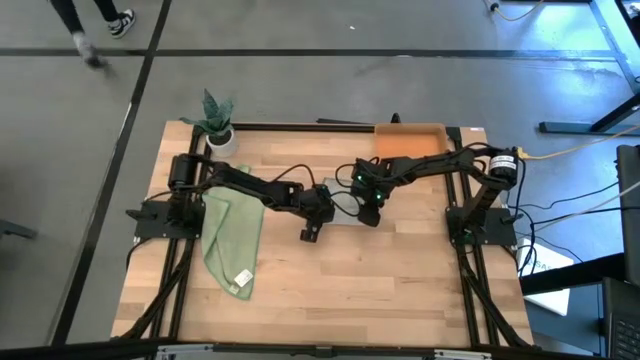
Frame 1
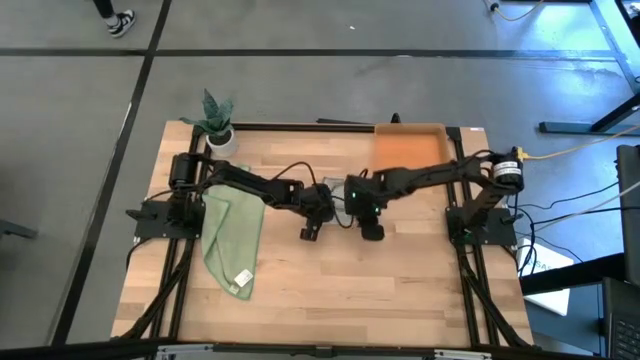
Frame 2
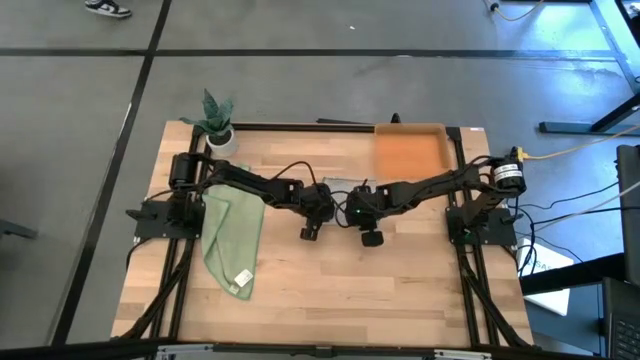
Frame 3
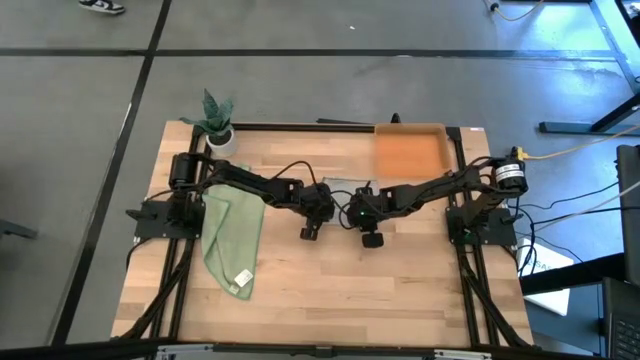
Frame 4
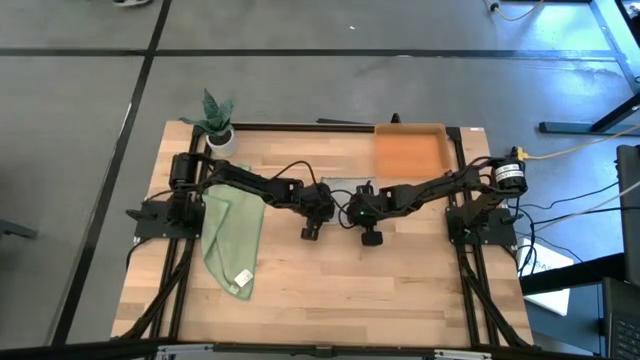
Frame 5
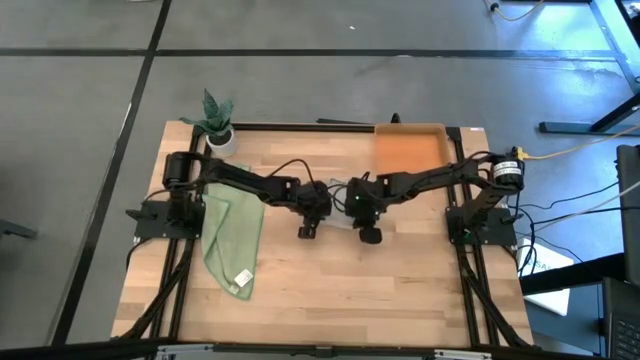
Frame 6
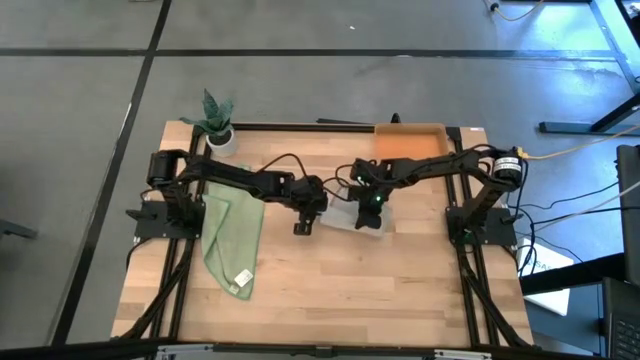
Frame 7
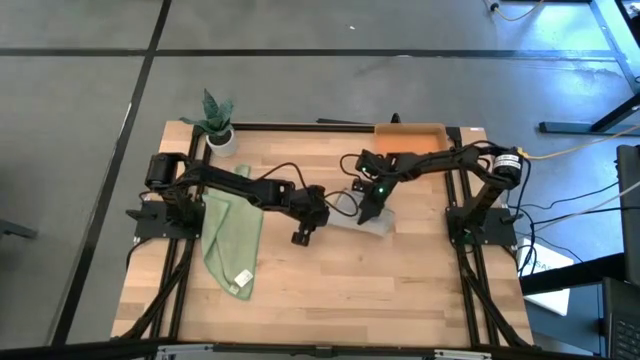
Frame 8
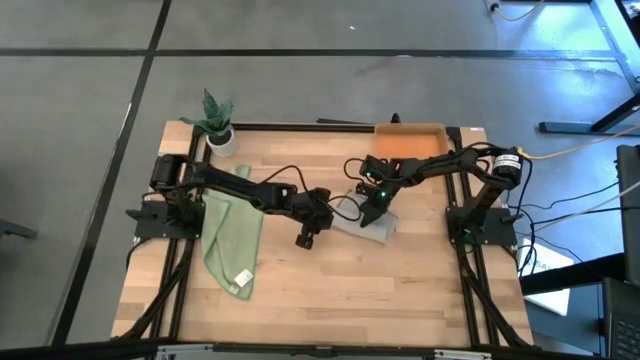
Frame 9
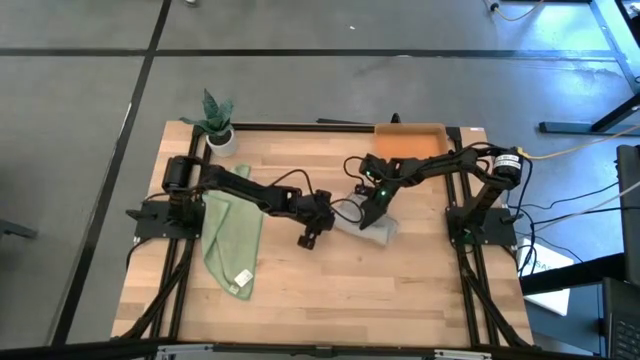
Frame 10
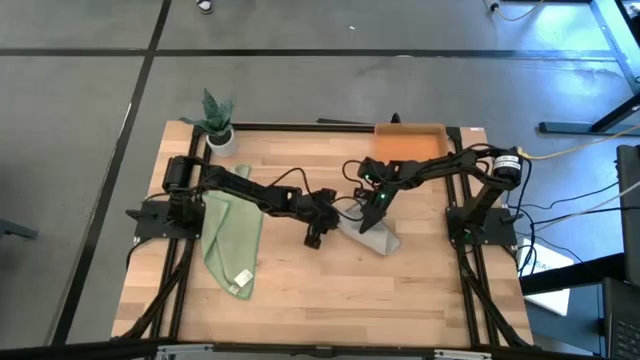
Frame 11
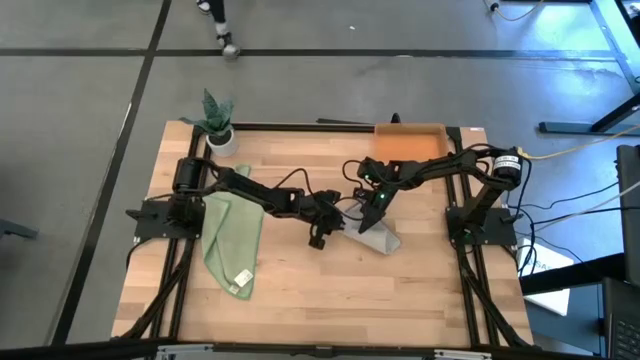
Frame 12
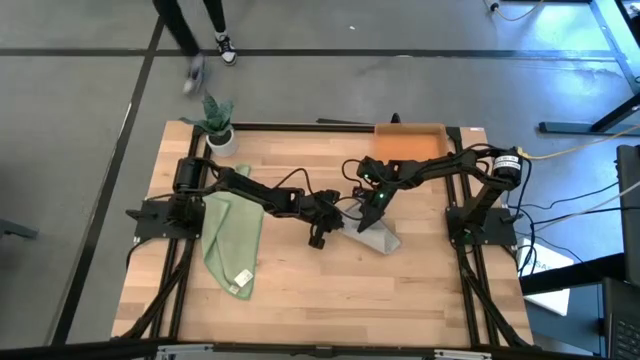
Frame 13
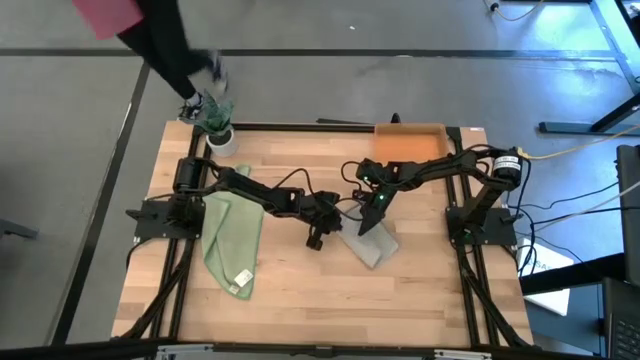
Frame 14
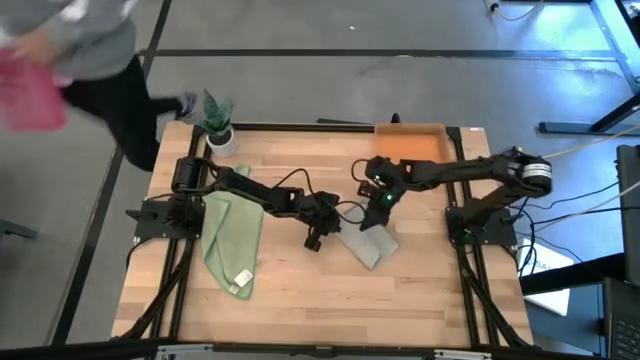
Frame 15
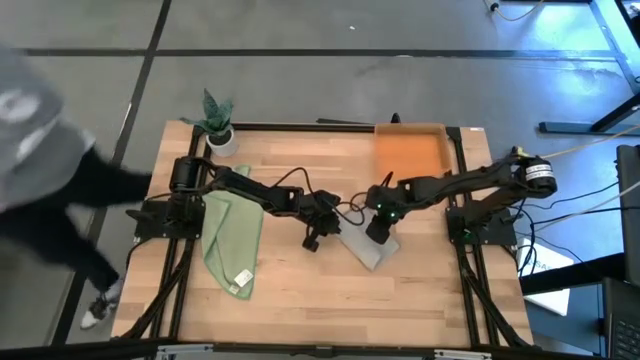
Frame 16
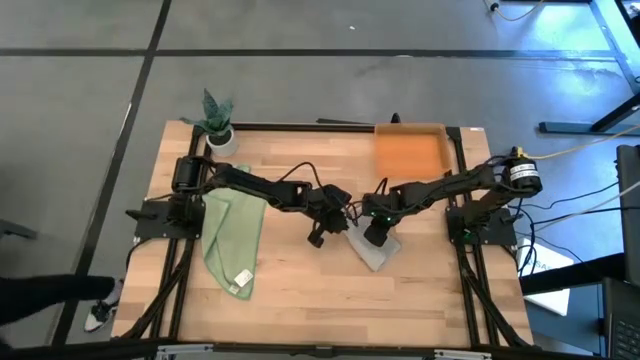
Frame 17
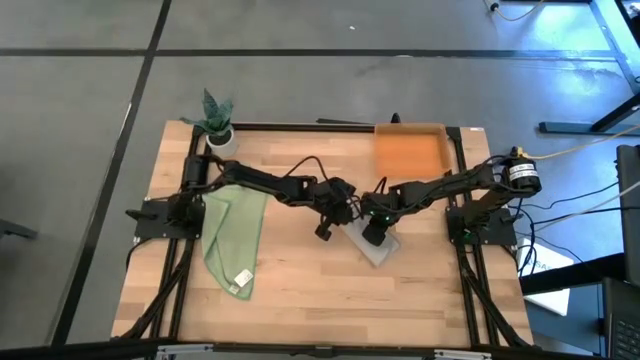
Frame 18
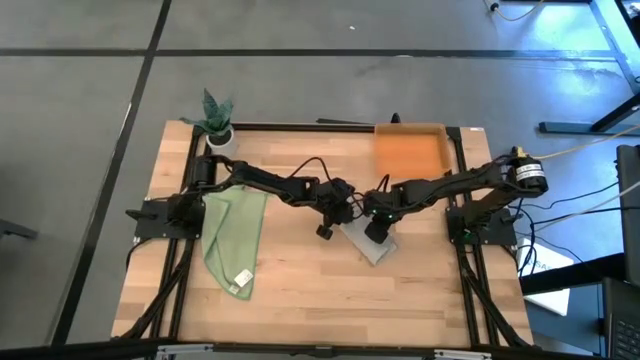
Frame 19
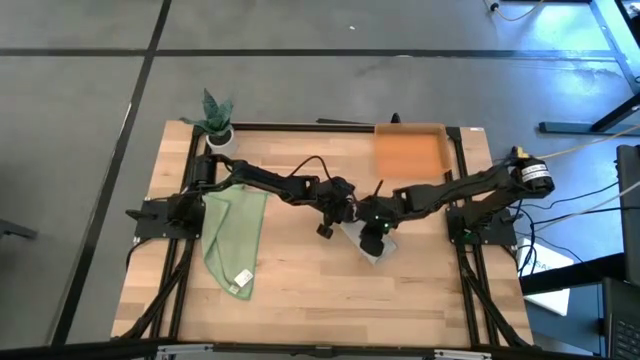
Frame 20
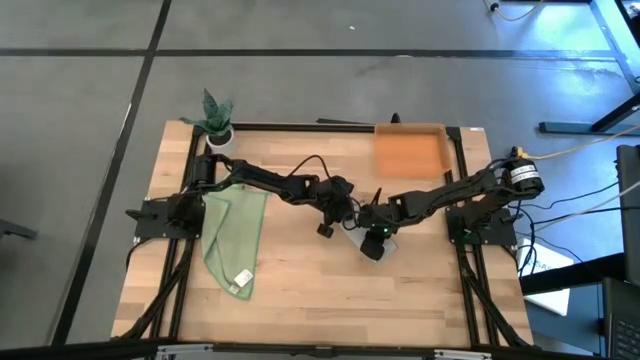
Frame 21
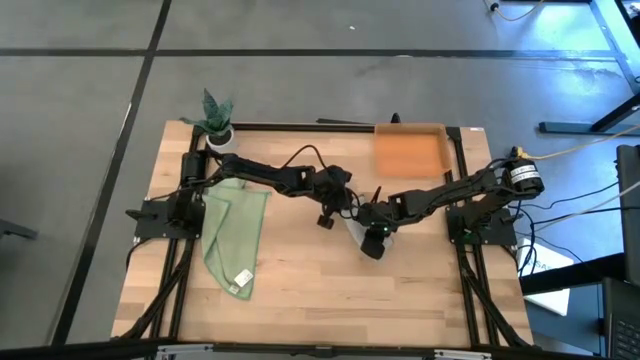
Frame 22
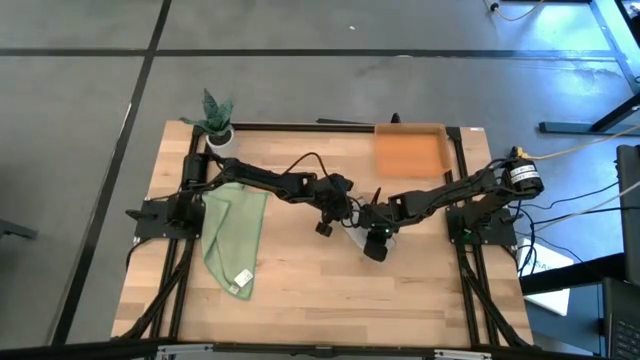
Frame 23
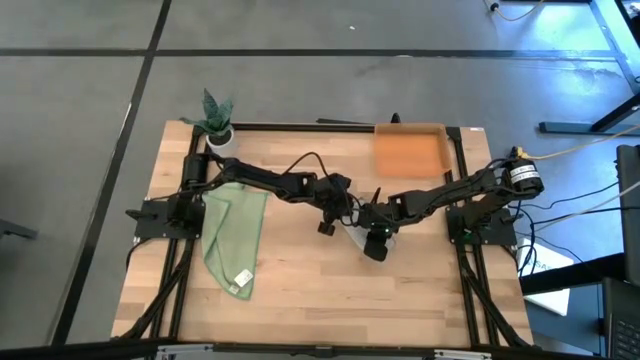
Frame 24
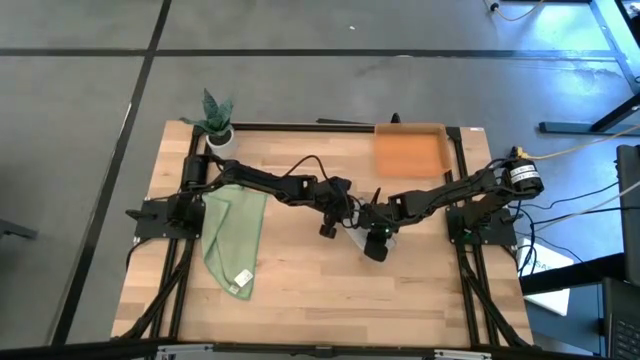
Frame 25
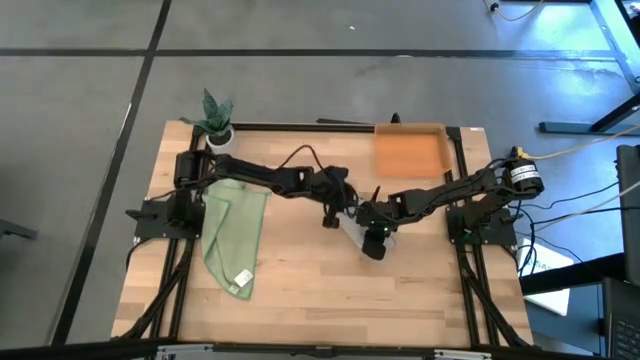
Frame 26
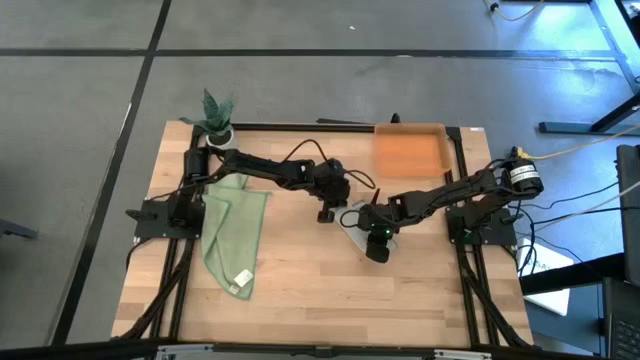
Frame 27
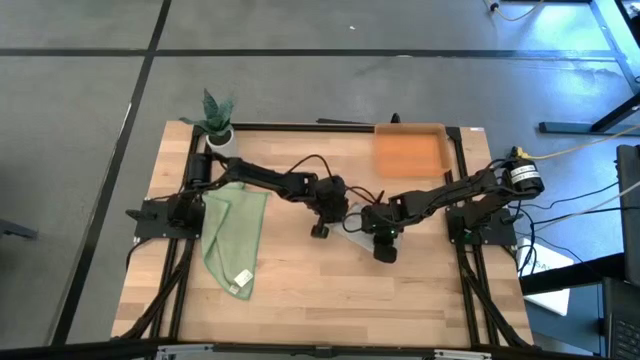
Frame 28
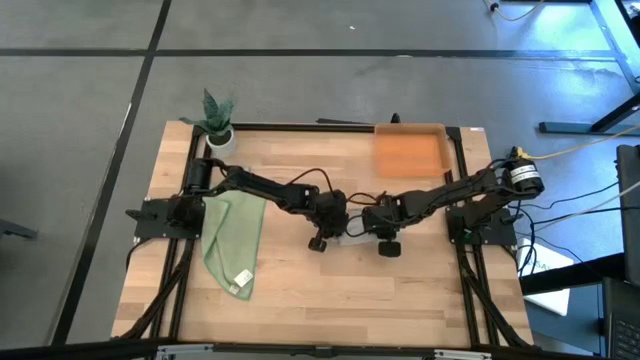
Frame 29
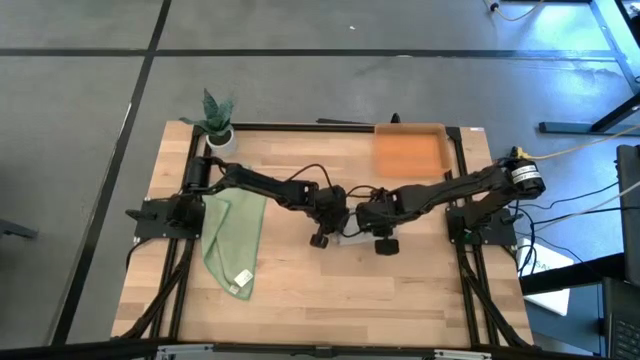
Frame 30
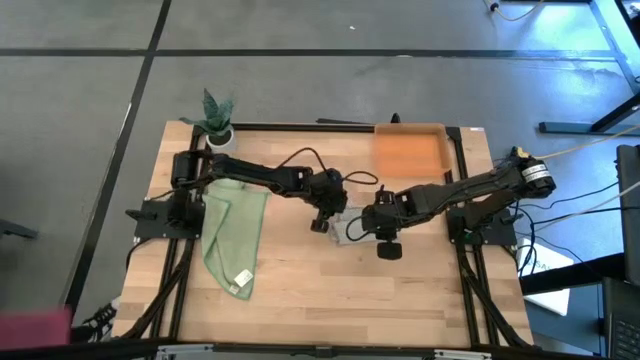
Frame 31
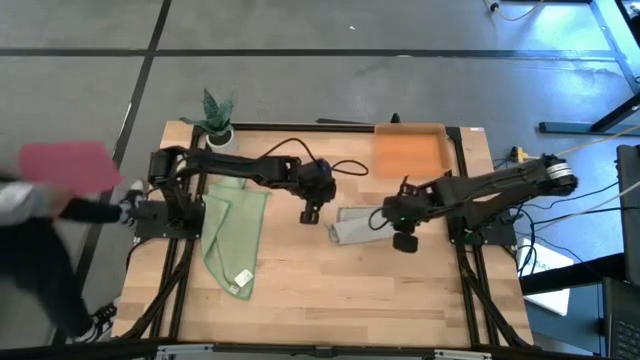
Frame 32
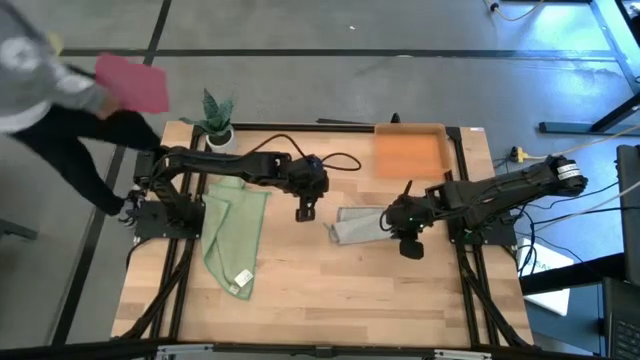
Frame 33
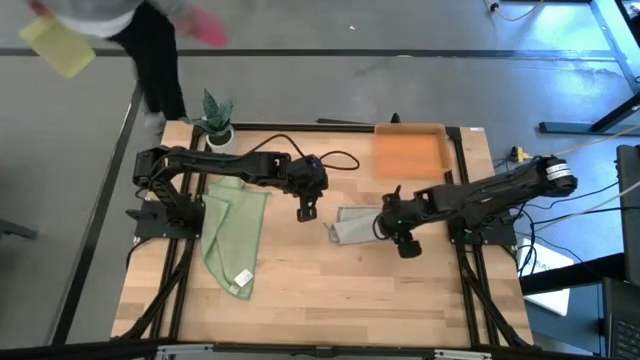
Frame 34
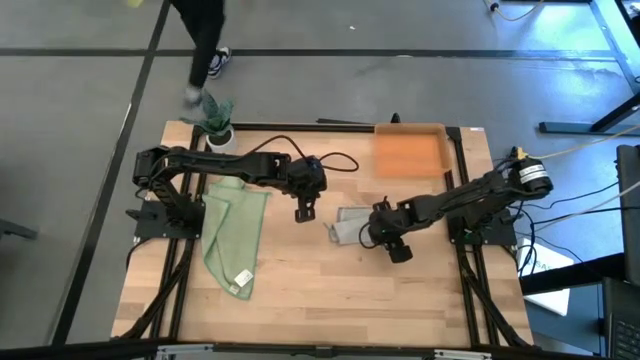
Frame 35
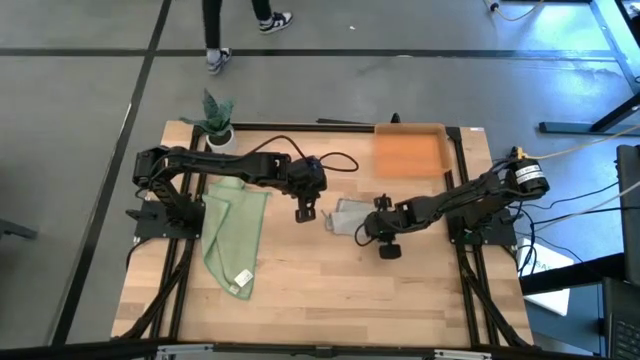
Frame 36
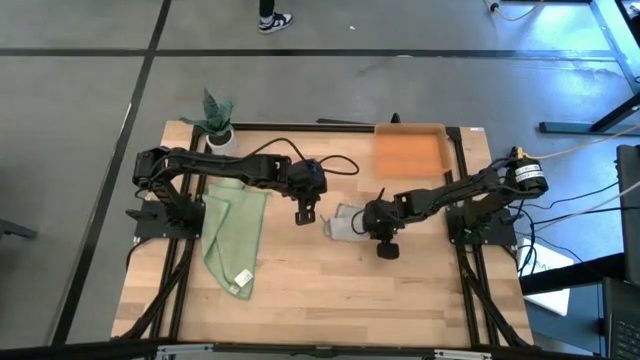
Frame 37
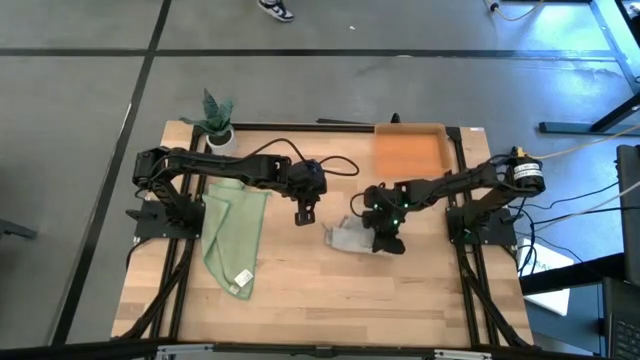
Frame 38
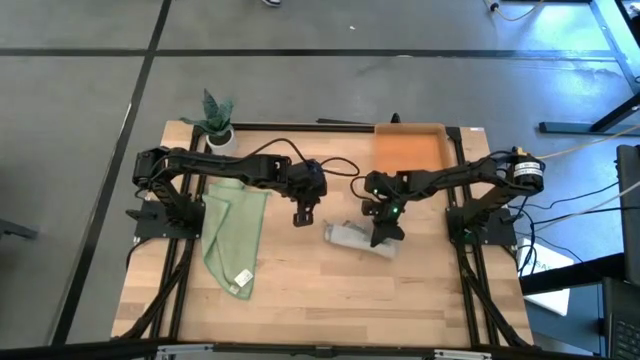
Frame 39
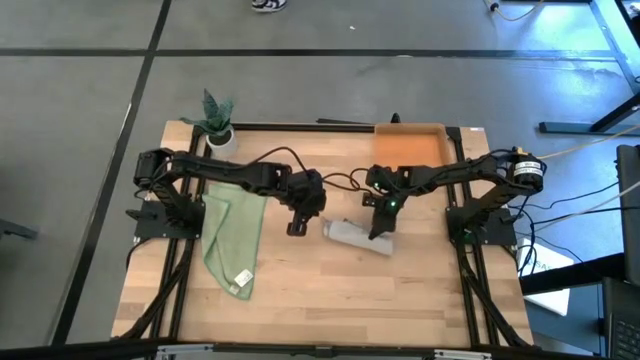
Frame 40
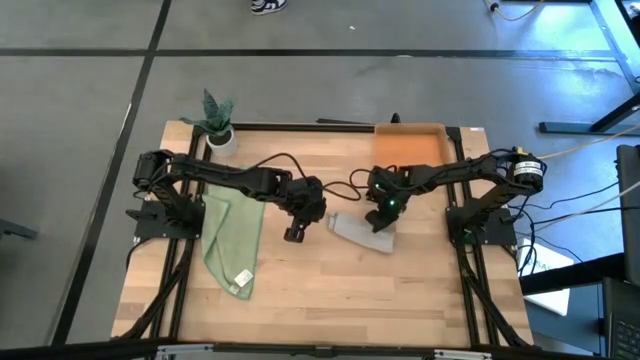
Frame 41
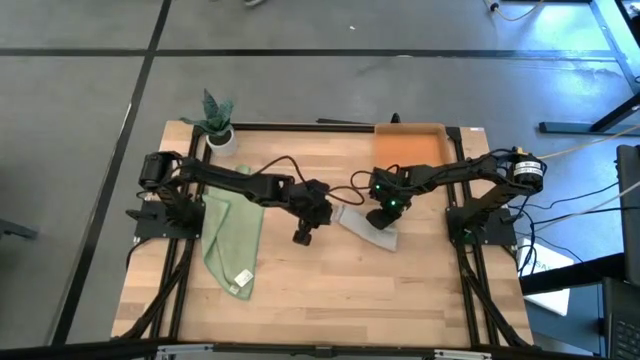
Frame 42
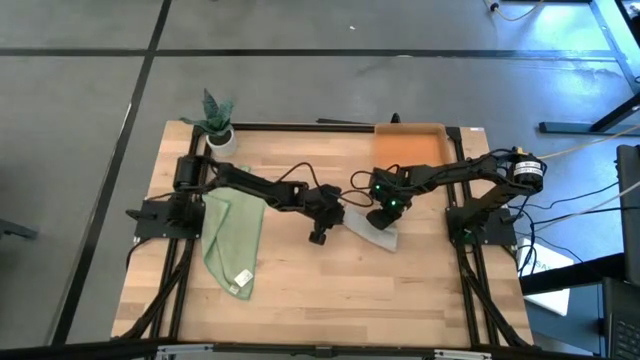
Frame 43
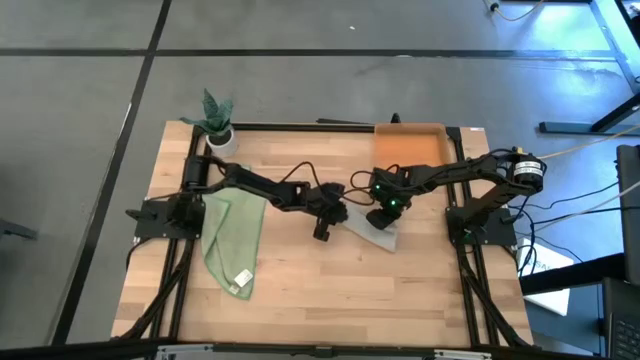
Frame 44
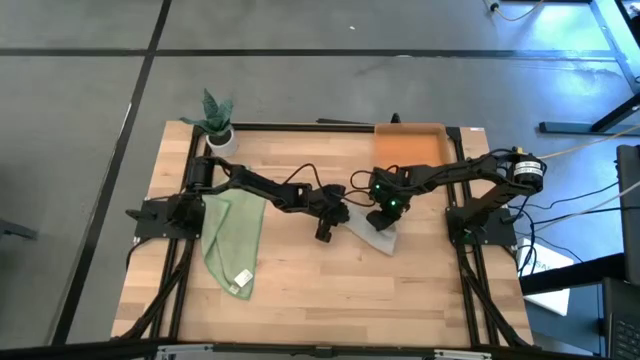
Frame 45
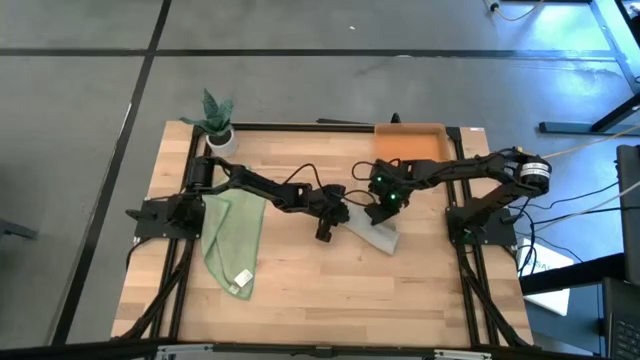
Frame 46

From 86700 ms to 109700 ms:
Task: Roll microfiber towels into tight, uniform cylinder then place into a basket
Roll the gray microfiber towel
